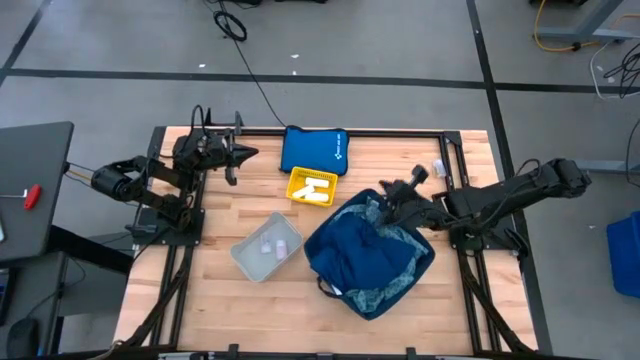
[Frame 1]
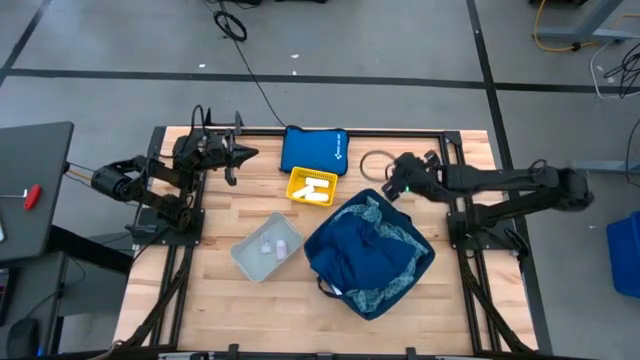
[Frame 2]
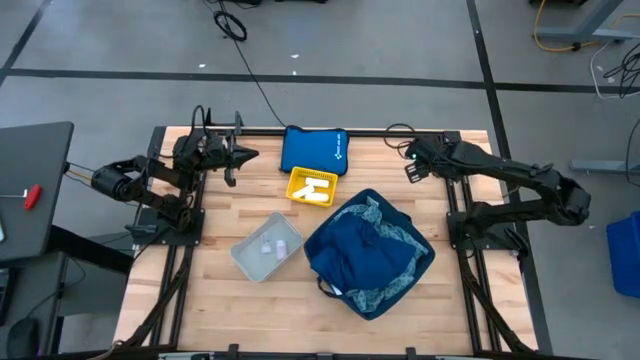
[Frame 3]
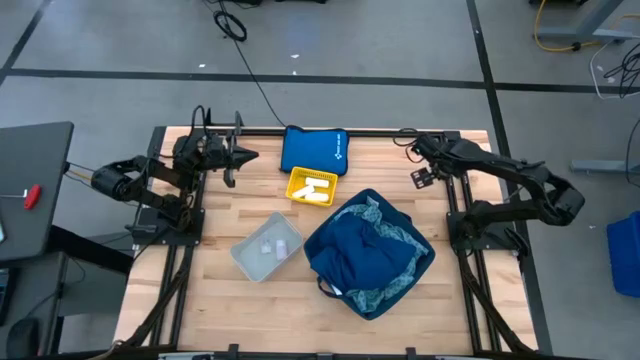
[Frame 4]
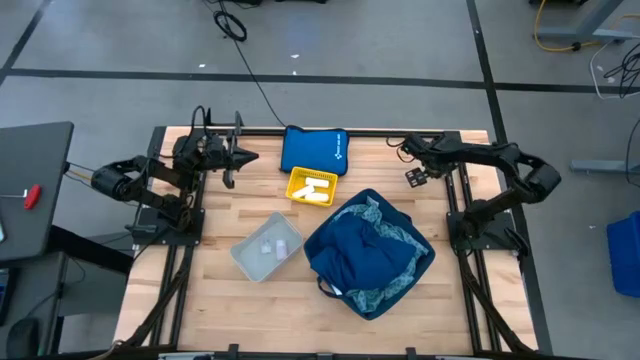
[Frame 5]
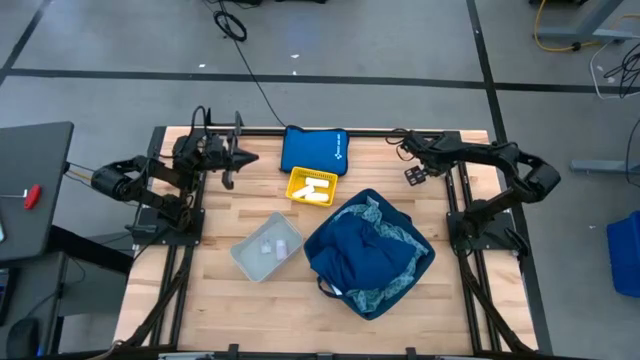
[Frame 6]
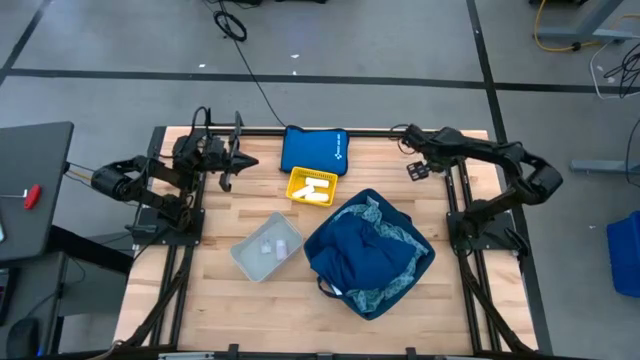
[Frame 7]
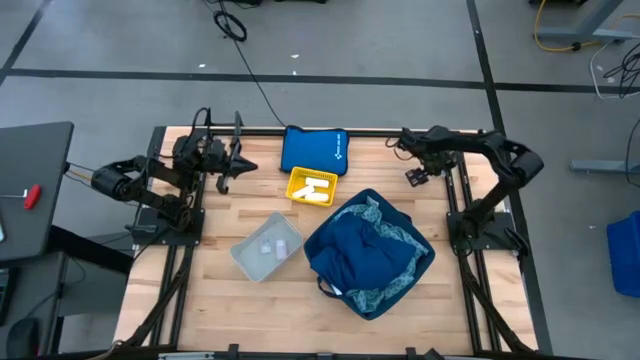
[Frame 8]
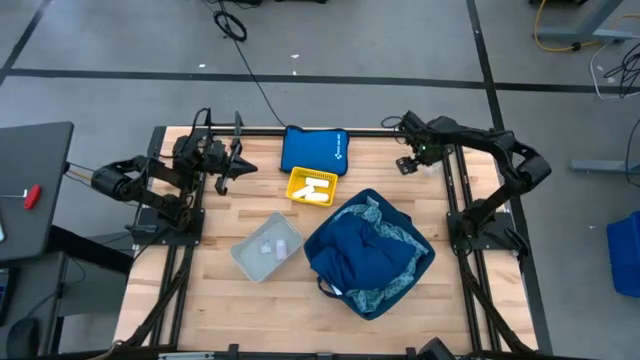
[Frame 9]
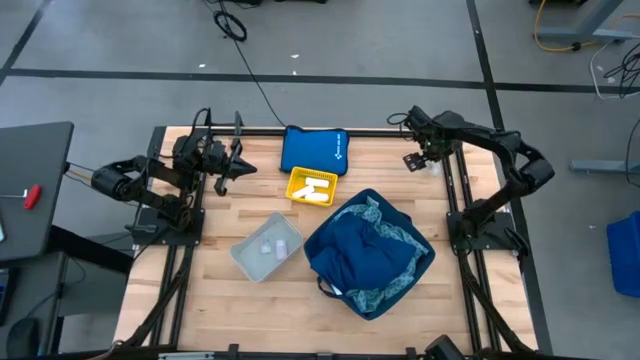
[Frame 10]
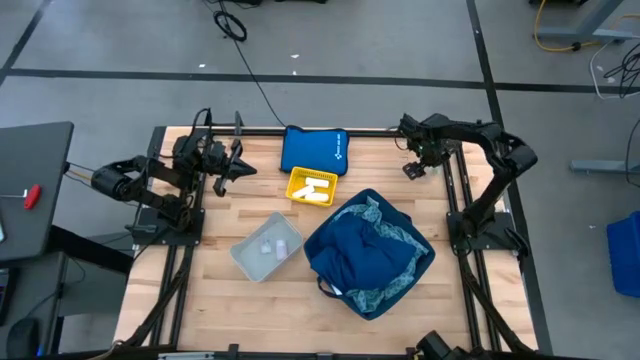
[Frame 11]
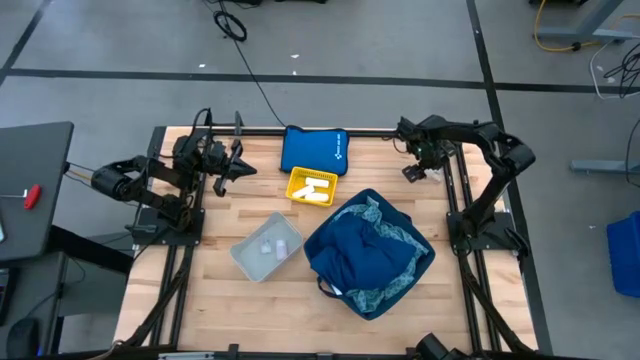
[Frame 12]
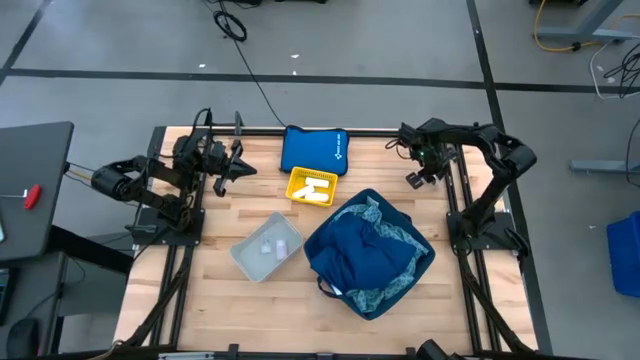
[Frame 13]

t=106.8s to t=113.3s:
Task: Pick & place medical supplies in basket/bin
Put the transparent pill bottle into the gray bin

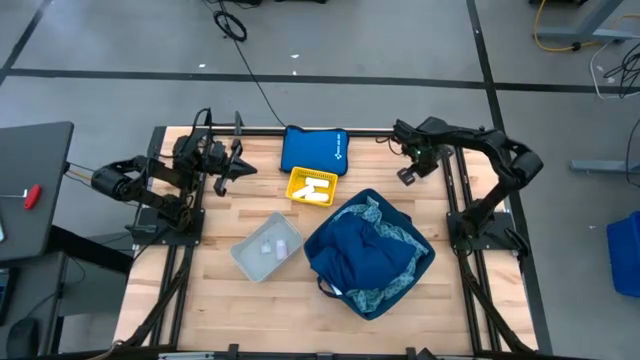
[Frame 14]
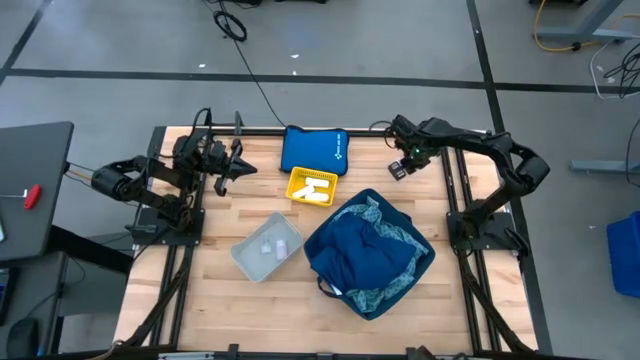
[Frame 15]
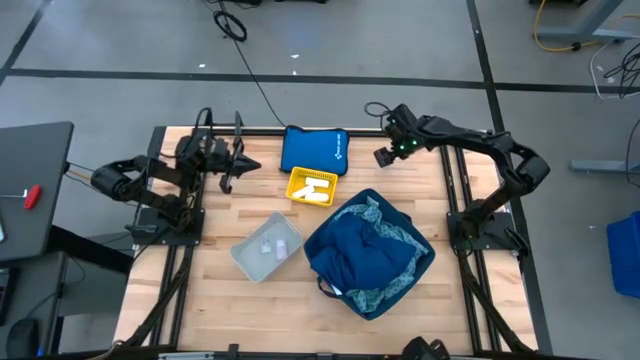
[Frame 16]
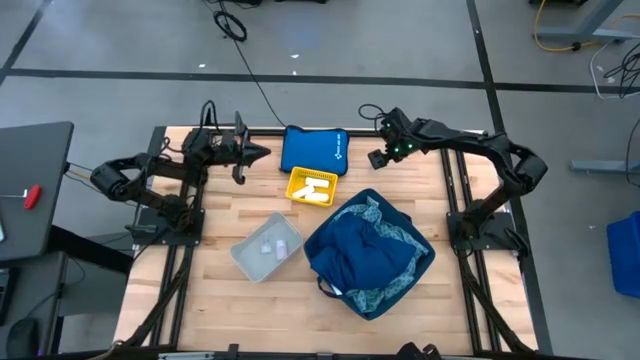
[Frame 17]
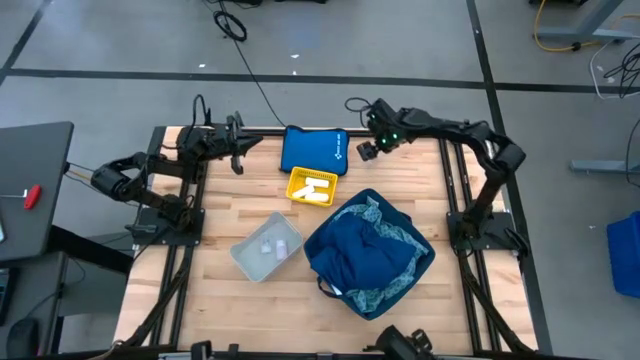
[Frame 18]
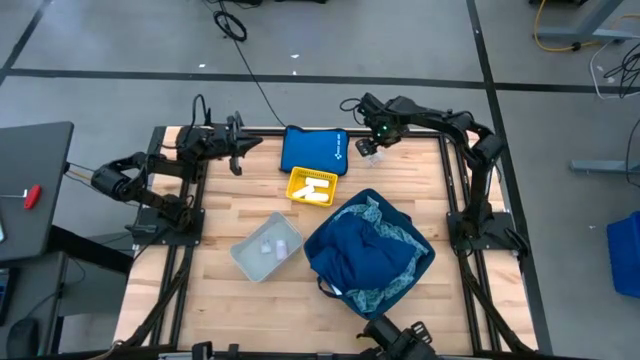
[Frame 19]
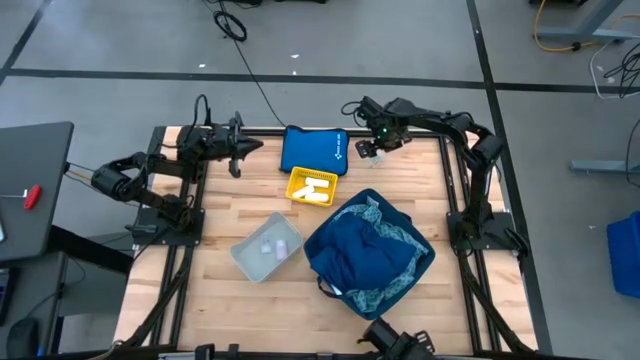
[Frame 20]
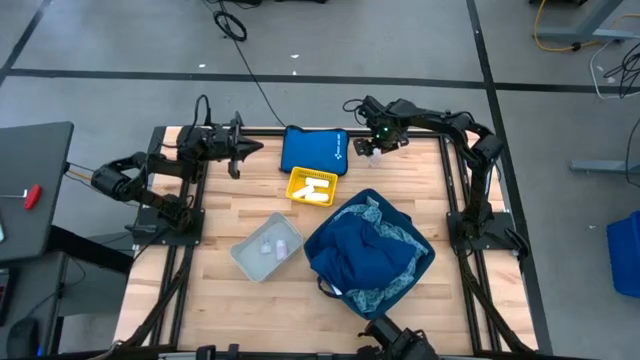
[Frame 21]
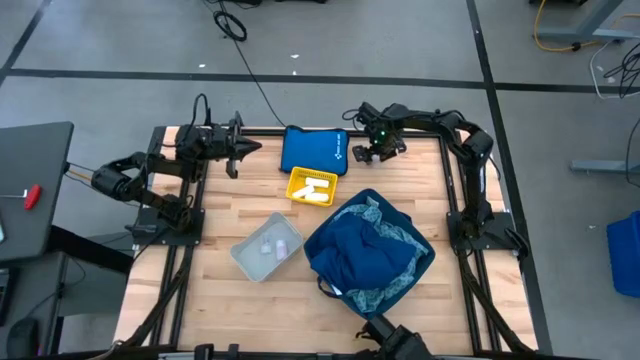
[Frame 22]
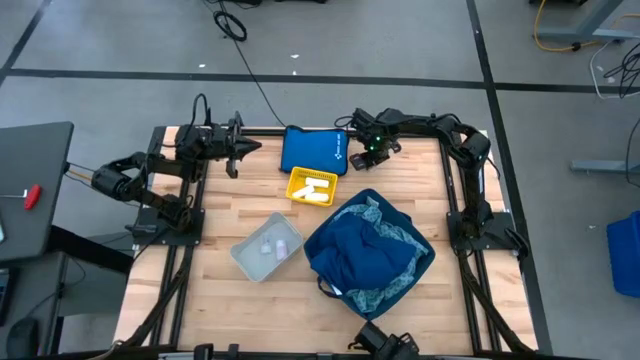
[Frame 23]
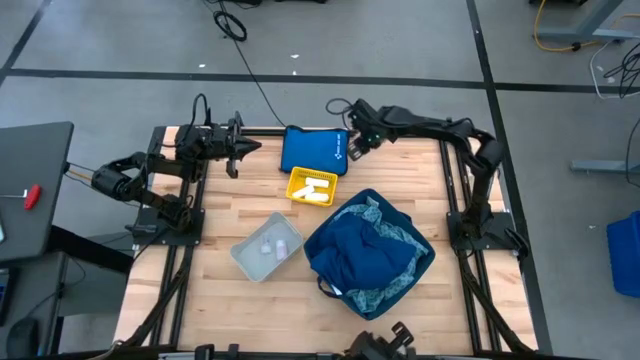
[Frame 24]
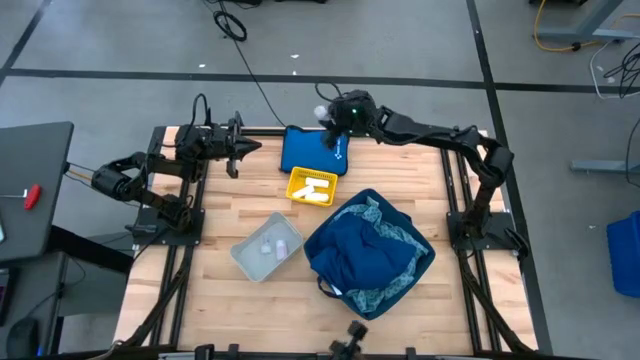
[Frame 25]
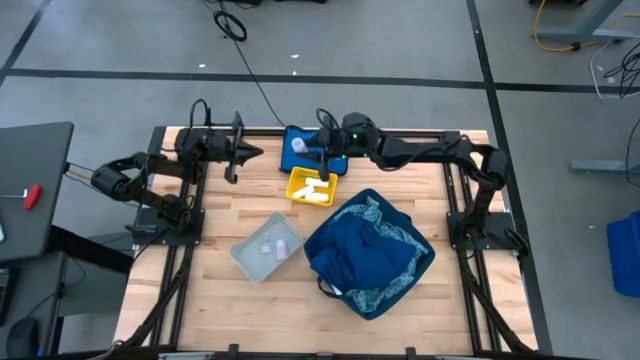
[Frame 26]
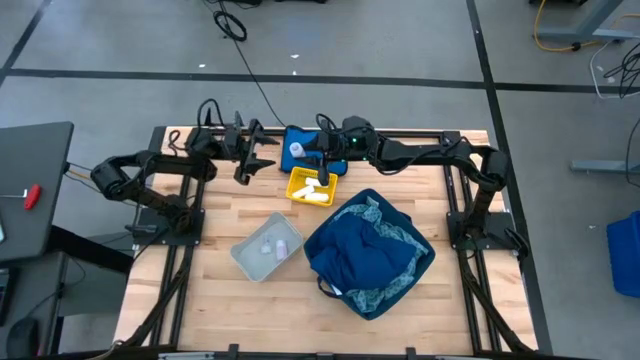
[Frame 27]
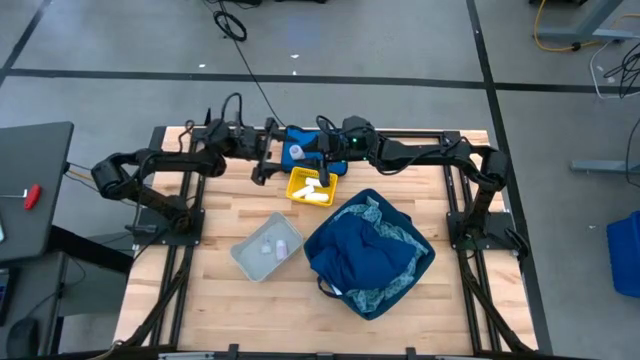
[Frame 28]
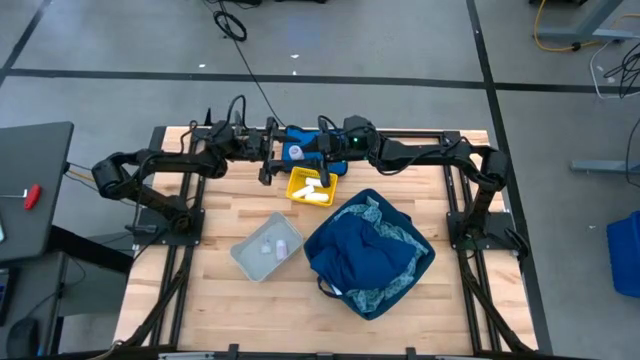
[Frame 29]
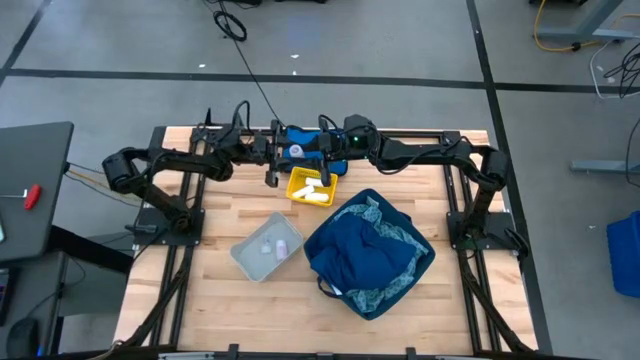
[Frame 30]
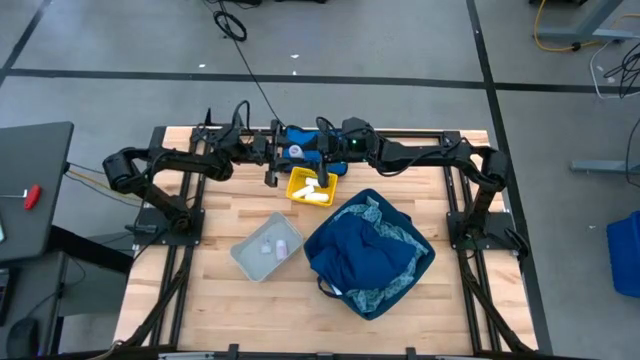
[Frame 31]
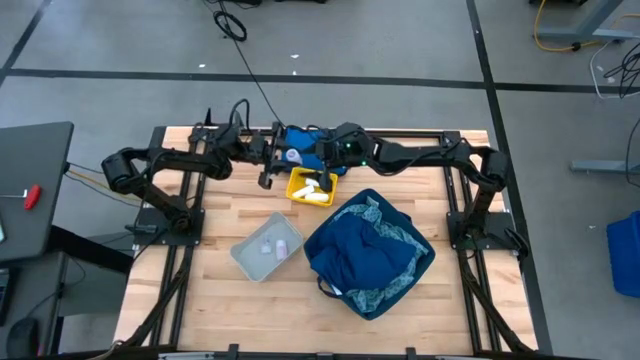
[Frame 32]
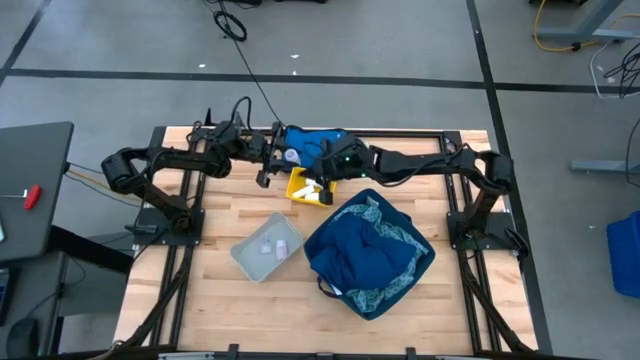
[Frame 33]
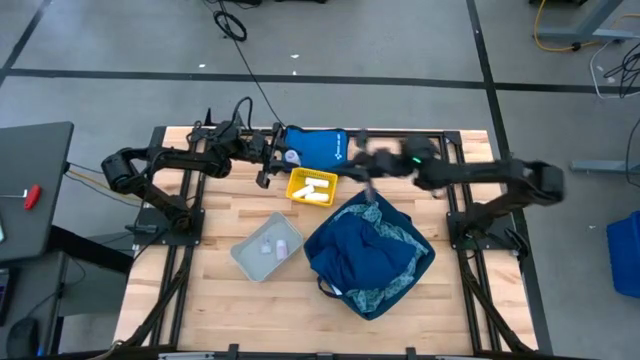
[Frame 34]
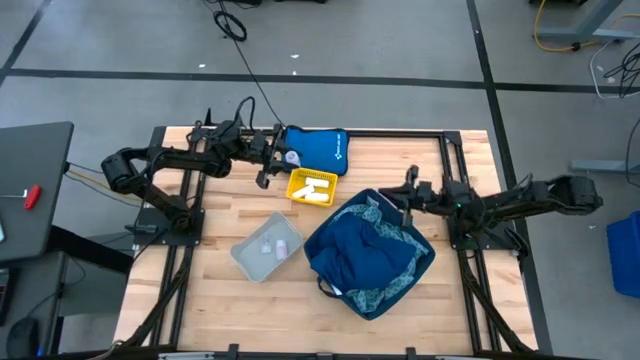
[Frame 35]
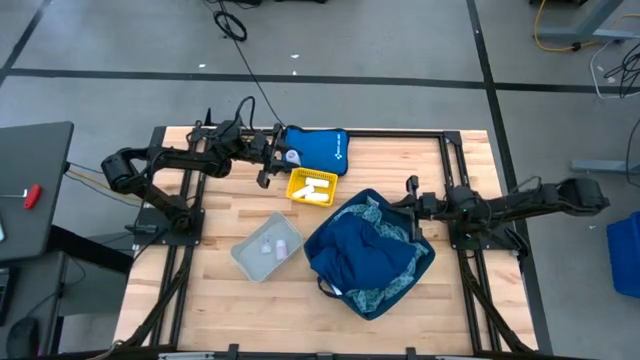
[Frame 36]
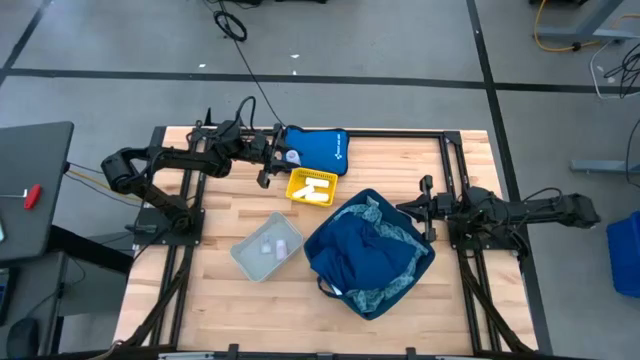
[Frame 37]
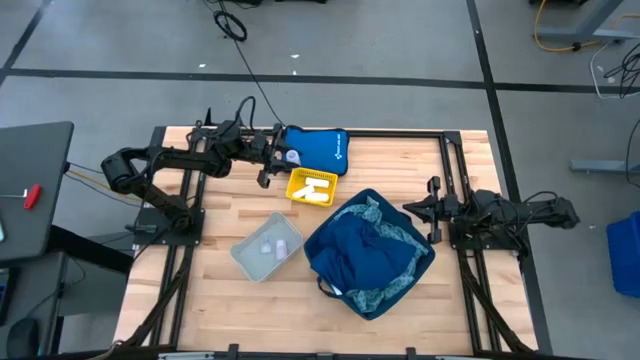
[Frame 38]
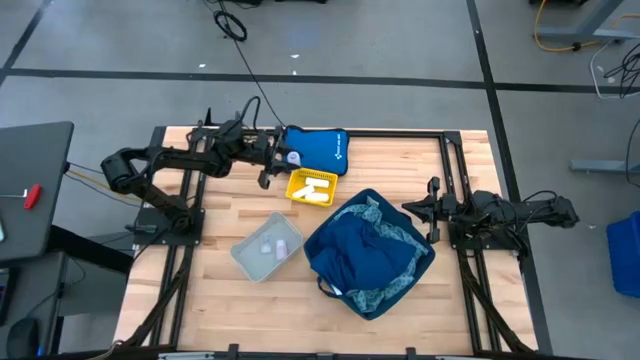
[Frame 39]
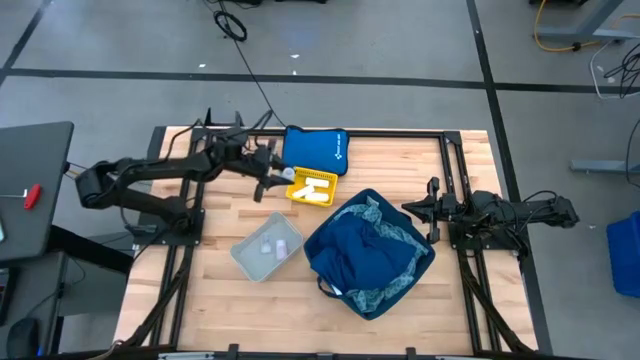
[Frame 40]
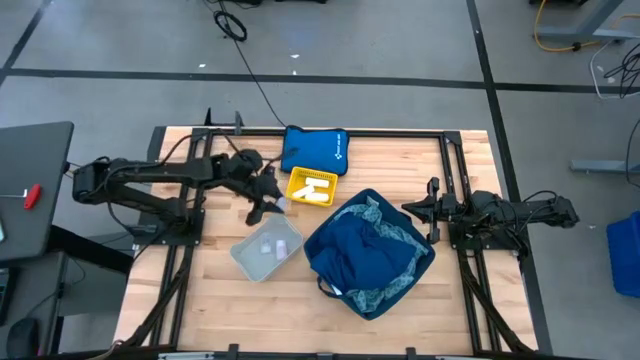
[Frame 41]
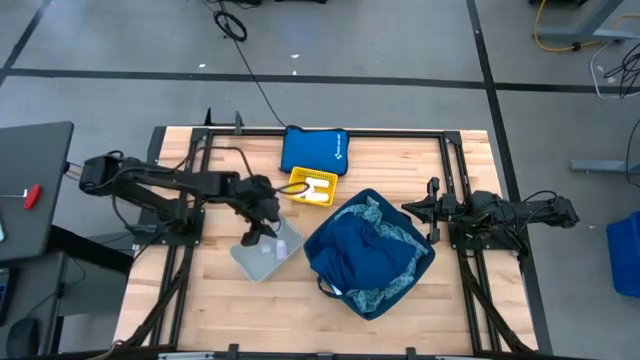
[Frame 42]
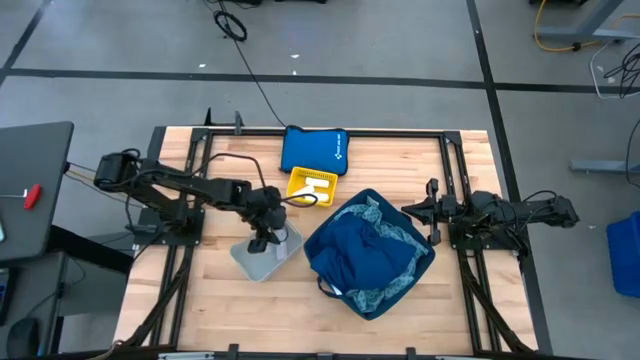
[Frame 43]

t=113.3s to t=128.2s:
Put the transparent pill bottle into the gray bin
